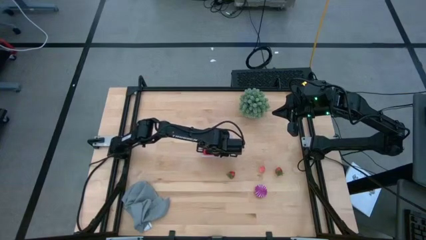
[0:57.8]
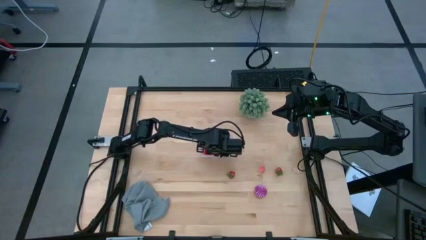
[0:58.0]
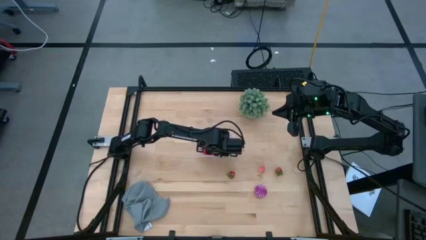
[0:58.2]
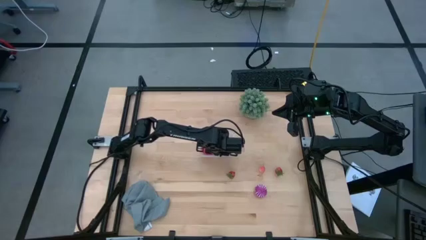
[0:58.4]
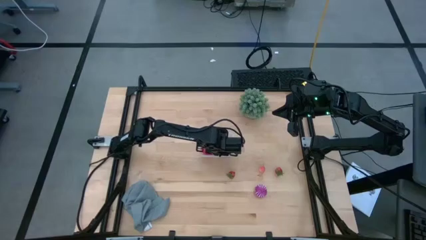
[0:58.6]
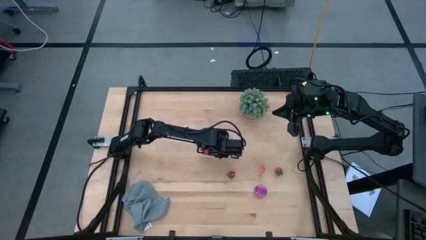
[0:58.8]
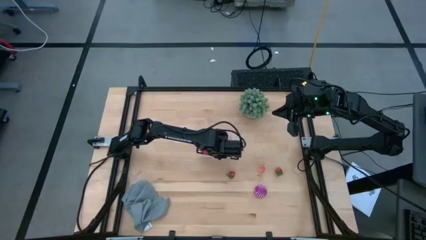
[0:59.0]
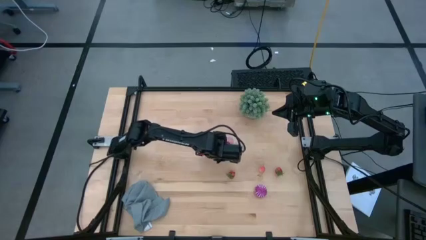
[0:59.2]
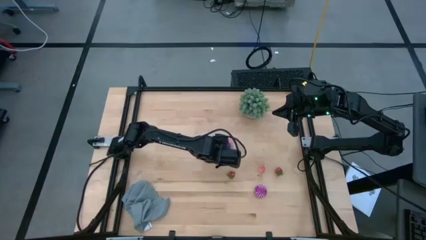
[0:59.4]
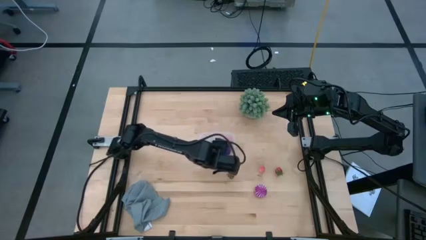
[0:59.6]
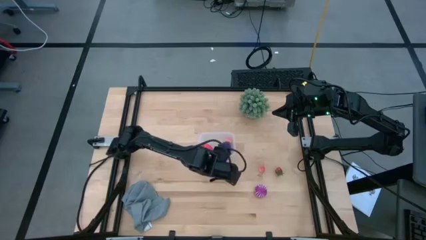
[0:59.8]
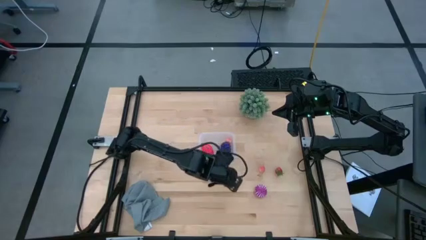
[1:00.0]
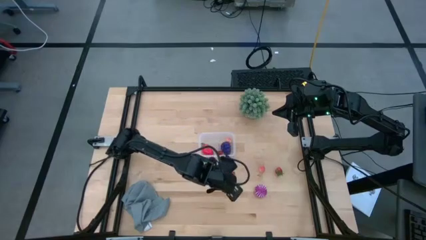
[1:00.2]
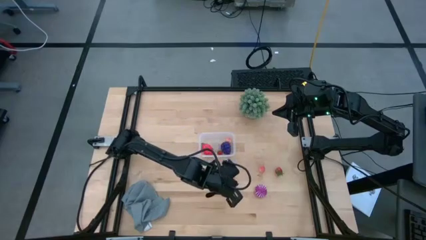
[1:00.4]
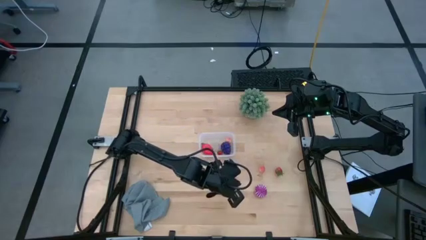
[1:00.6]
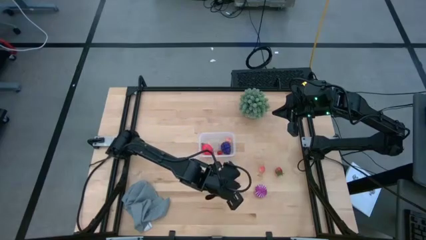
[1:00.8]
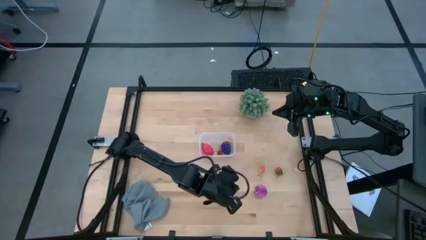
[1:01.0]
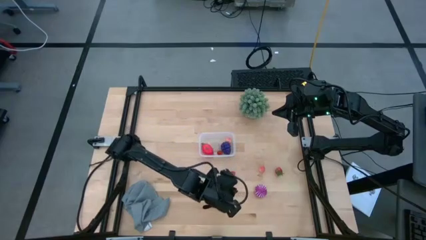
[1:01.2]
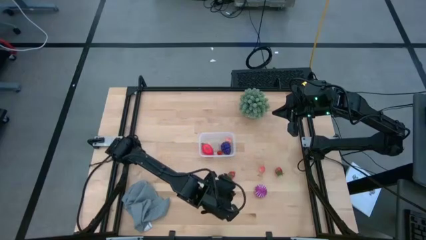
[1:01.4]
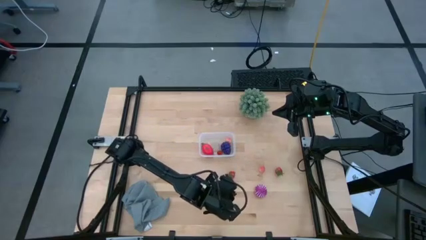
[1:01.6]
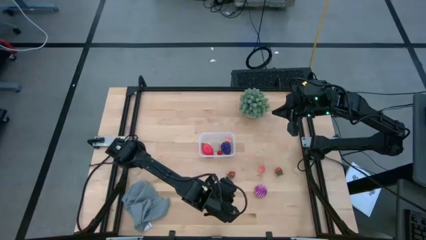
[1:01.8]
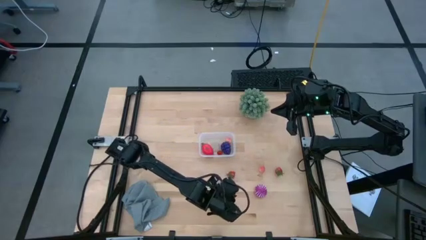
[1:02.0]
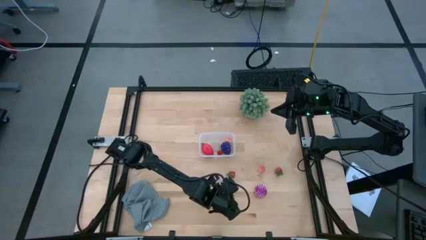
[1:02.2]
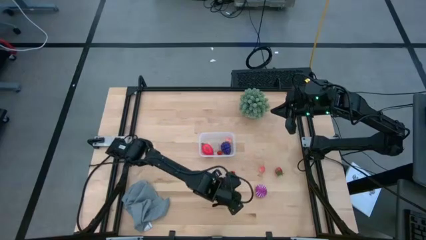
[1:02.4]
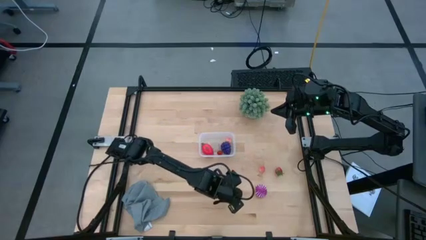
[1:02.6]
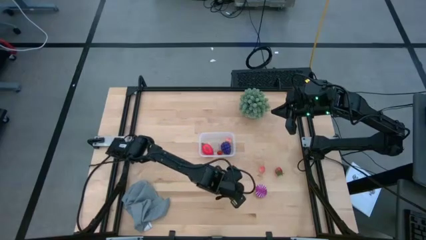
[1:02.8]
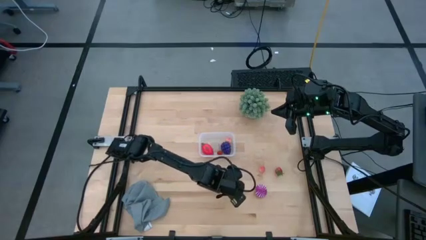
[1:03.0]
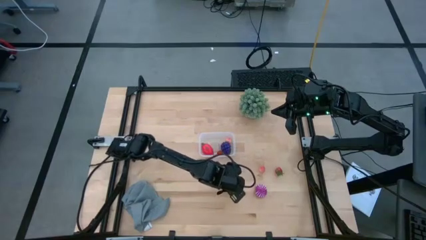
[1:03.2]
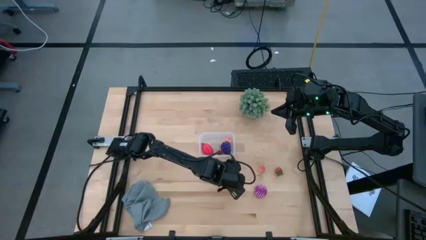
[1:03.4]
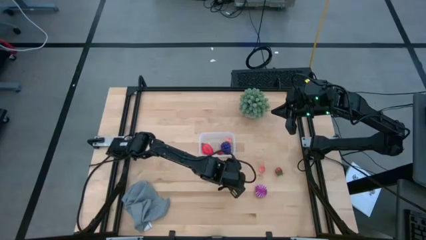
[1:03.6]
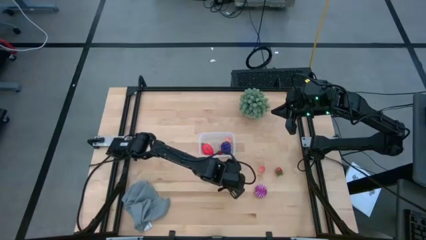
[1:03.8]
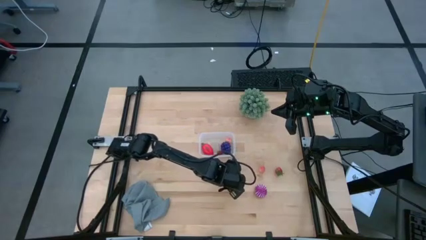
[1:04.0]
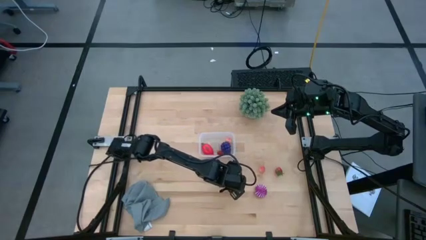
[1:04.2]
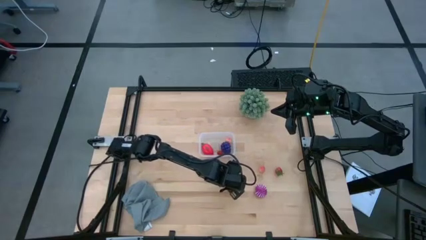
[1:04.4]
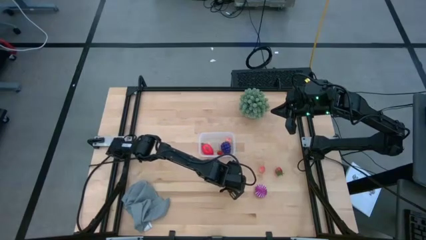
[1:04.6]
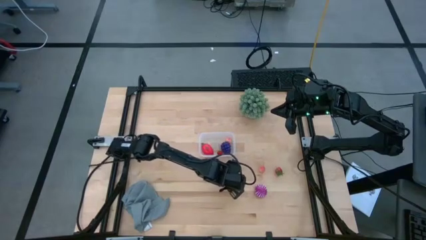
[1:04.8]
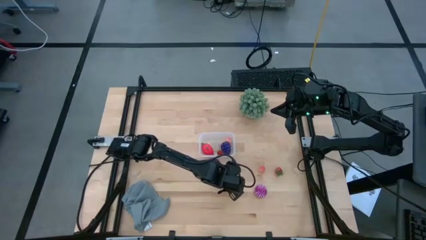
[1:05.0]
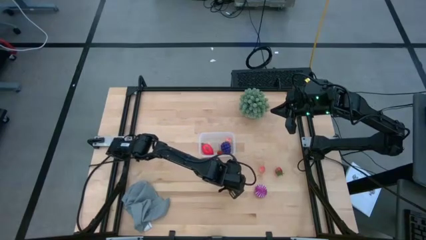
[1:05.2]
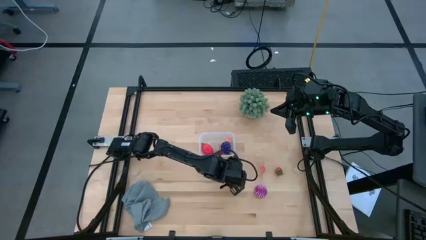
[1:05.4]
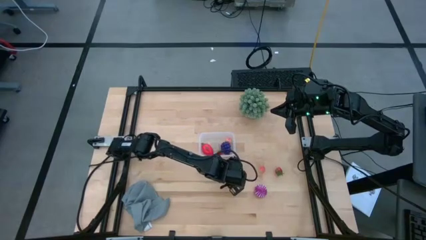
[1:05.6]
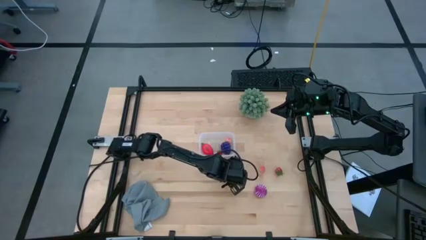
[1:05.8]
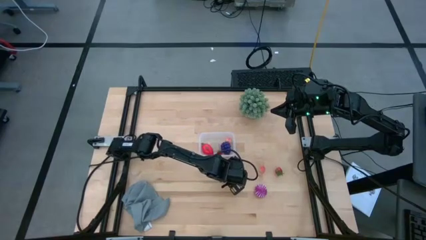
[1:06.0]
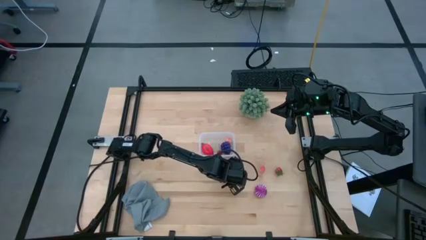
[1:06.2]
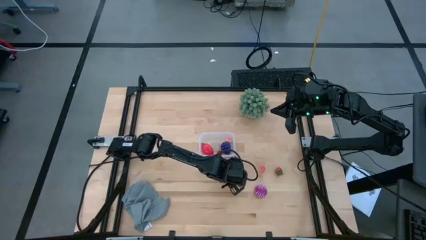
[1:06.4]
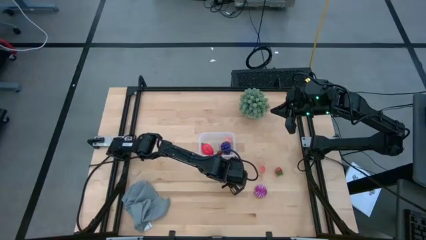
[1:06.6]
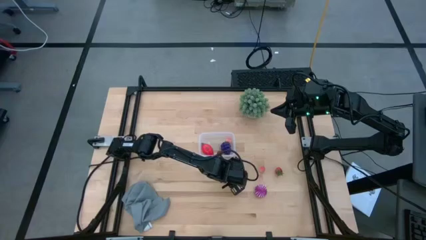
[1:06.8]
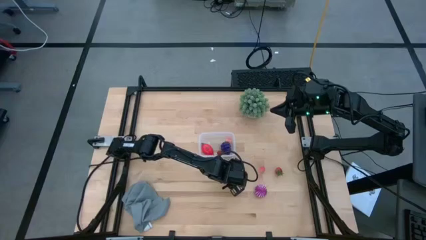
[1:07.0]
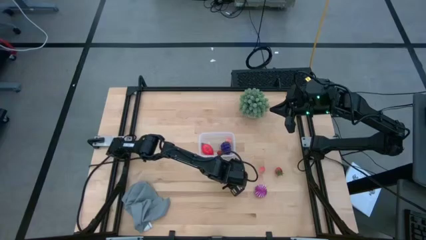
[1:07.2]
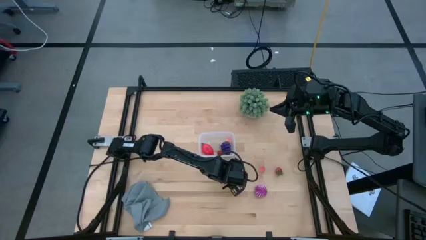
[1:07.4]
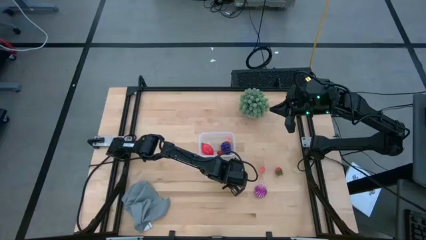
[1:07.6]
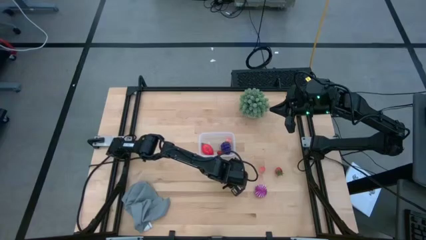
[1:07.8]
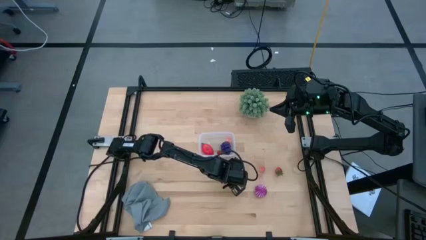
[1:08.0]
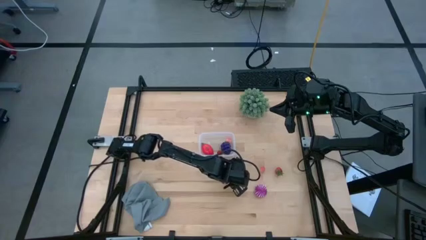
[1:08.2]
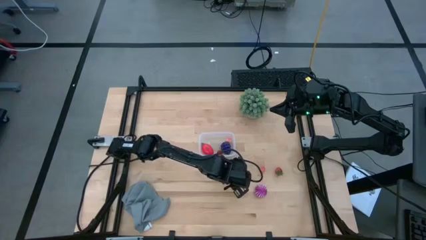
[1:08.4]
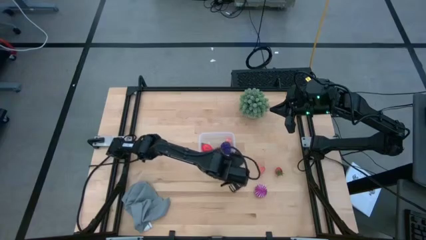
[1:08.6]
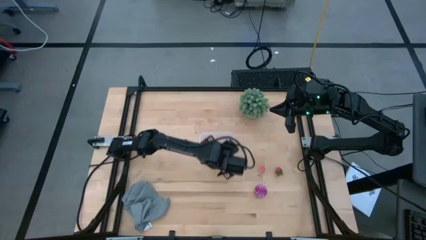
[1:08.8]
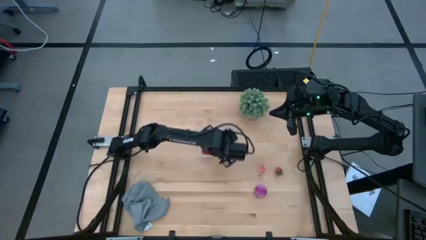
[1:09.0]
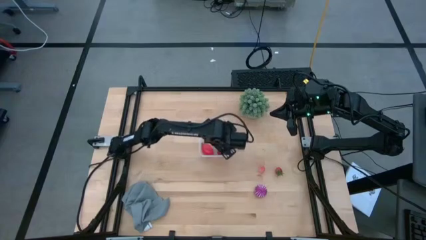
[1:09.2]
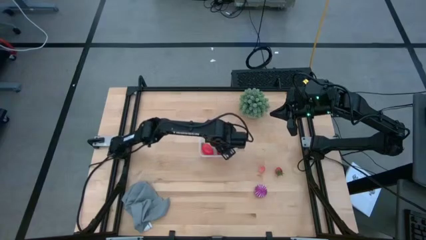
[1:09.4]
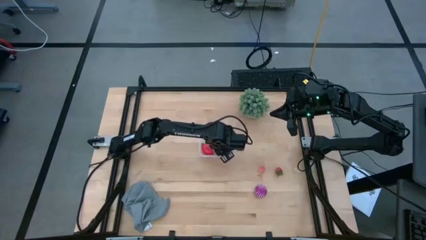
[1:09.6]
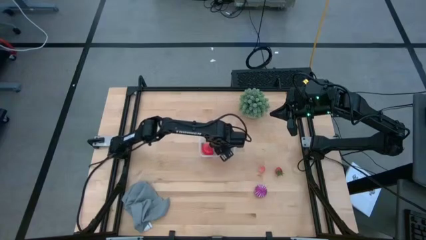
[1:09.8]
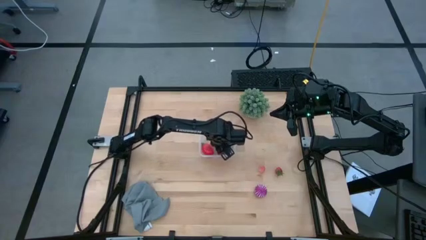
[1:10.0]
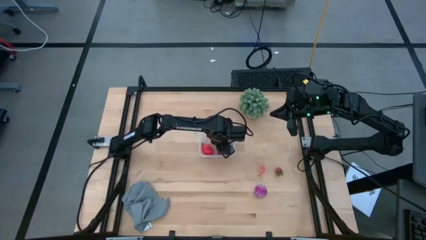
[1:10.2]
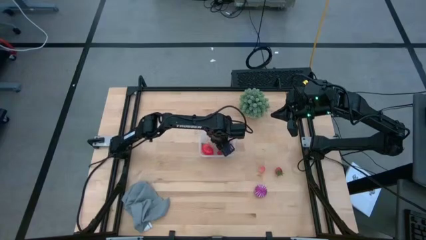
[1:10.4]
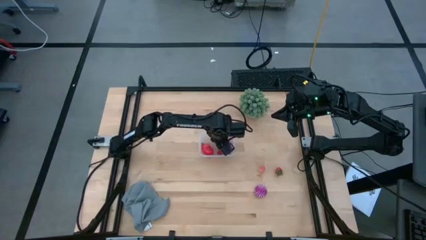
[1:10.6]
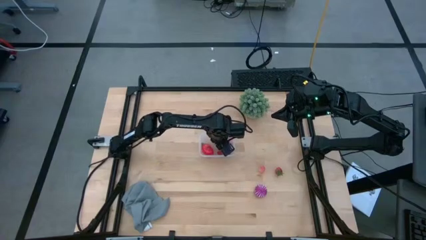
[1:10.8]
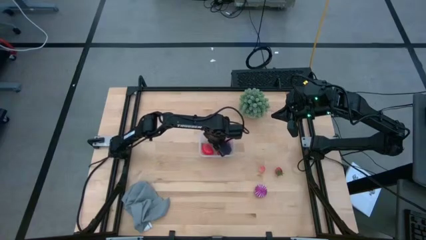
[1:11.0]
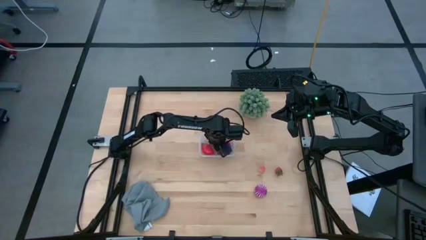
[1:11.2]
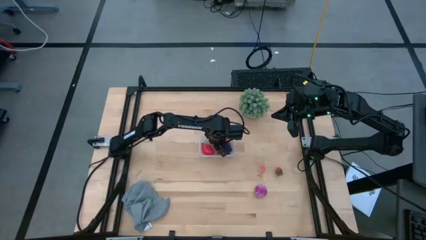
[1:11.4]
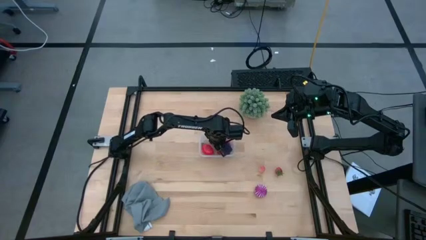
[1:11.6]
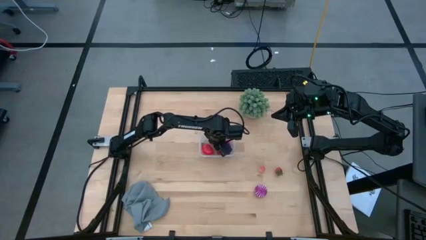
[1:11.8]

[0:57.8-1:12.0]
Task: Pick and placing Produce into tupperware
Put the left red strawberry into the transparent bin
